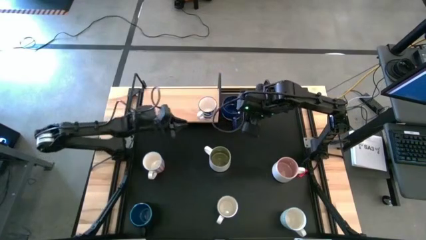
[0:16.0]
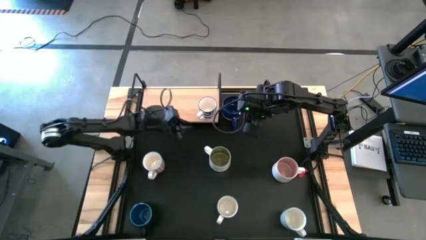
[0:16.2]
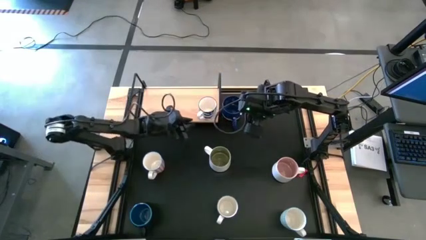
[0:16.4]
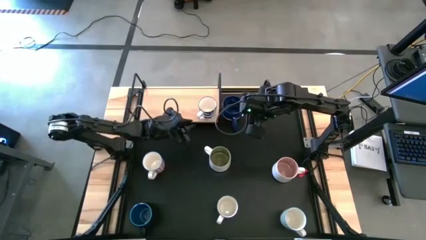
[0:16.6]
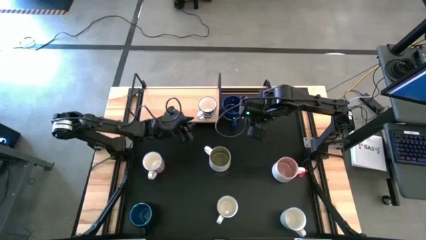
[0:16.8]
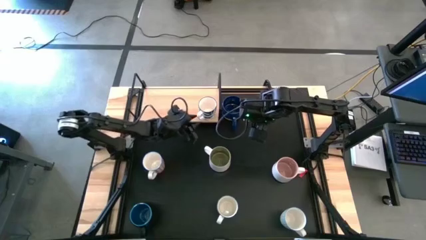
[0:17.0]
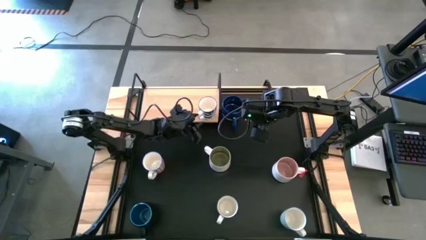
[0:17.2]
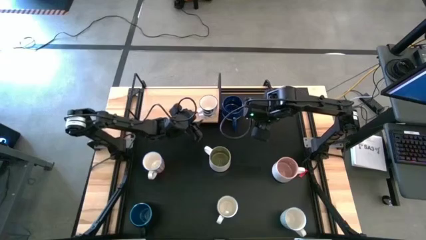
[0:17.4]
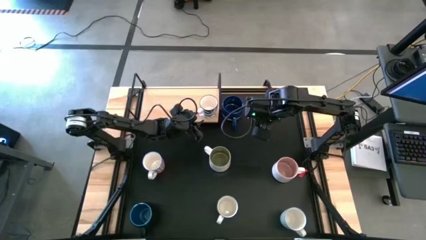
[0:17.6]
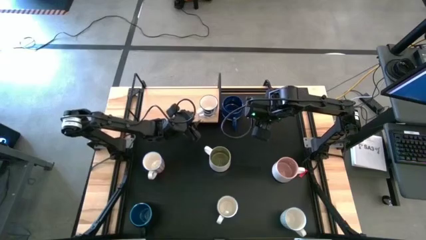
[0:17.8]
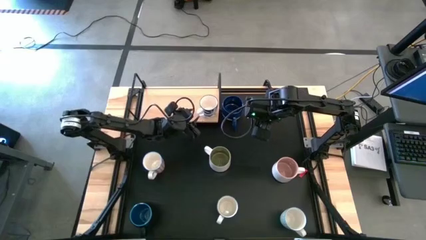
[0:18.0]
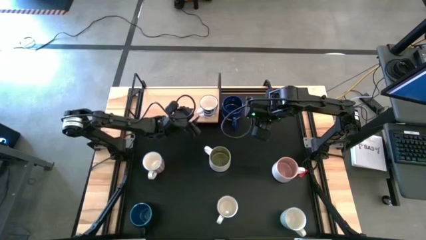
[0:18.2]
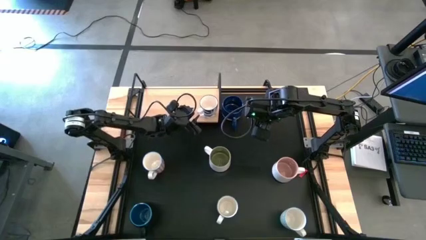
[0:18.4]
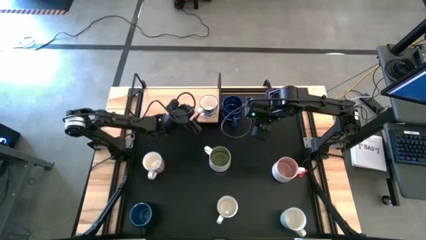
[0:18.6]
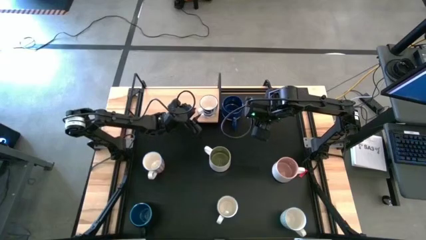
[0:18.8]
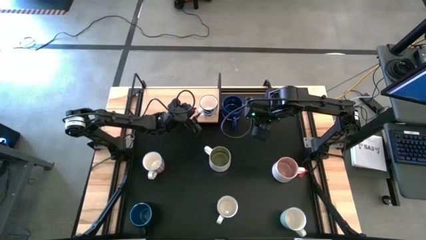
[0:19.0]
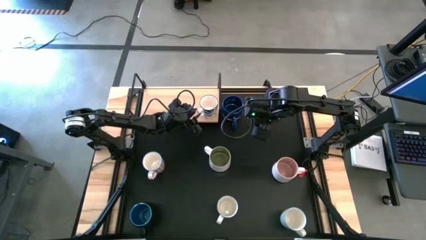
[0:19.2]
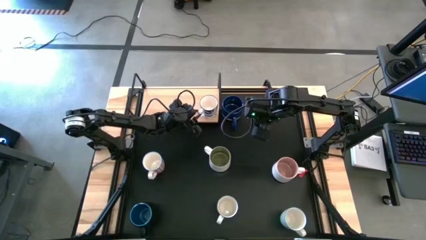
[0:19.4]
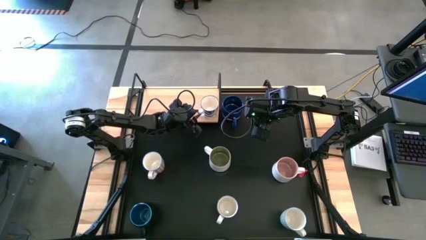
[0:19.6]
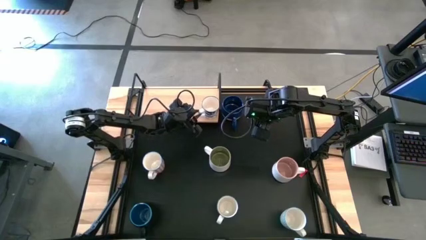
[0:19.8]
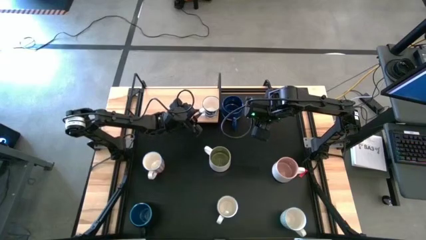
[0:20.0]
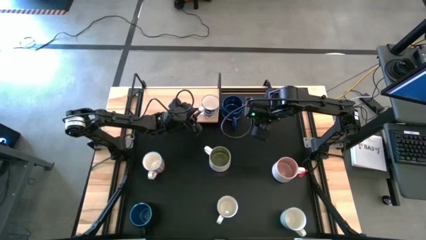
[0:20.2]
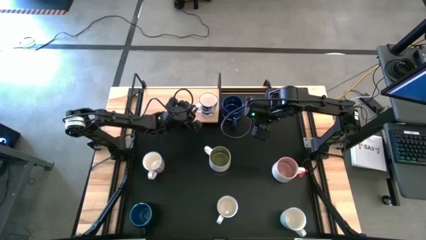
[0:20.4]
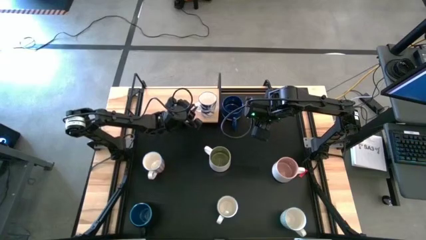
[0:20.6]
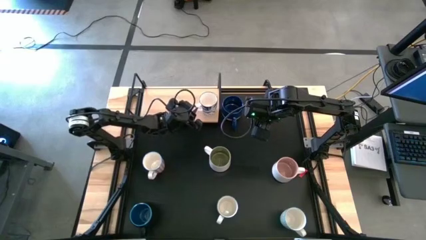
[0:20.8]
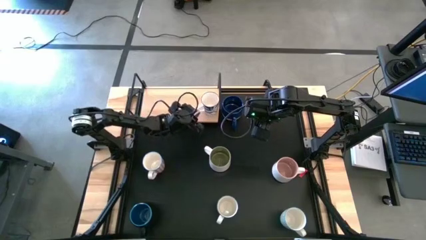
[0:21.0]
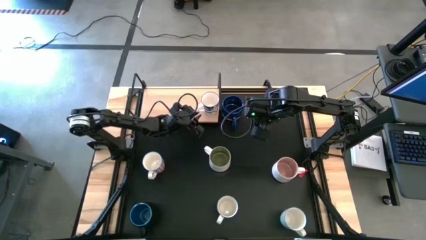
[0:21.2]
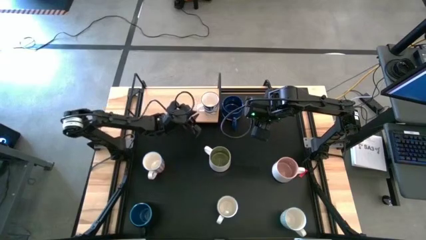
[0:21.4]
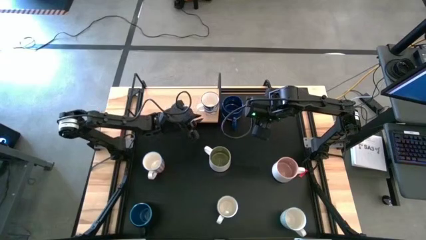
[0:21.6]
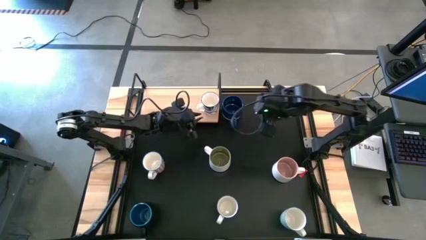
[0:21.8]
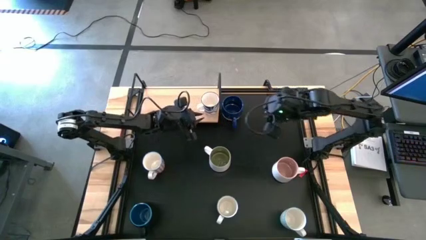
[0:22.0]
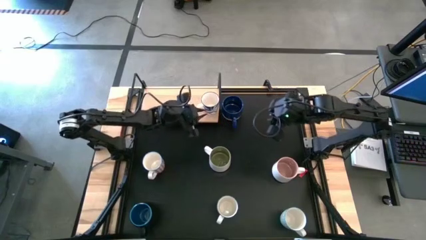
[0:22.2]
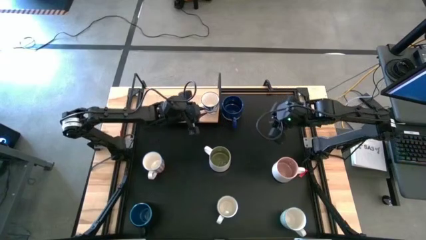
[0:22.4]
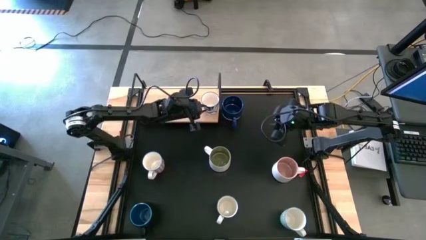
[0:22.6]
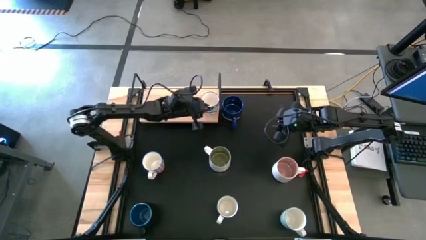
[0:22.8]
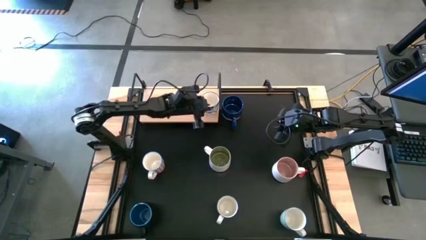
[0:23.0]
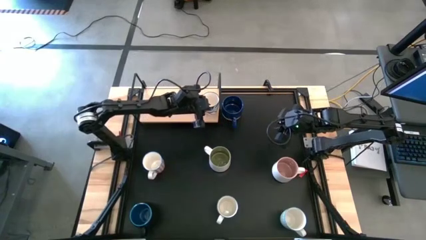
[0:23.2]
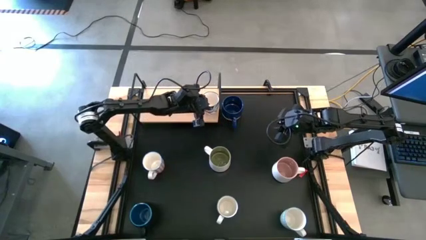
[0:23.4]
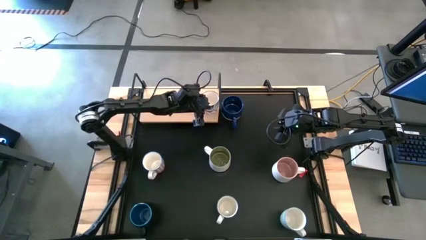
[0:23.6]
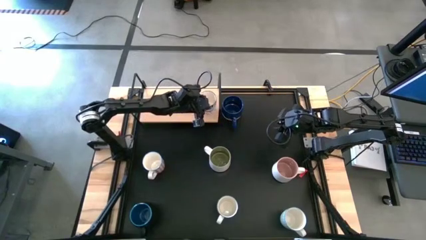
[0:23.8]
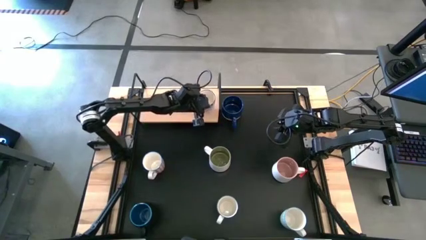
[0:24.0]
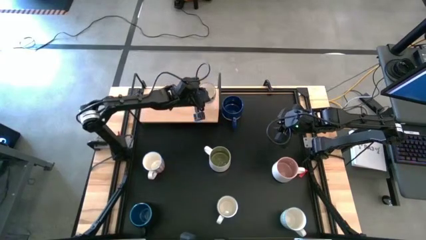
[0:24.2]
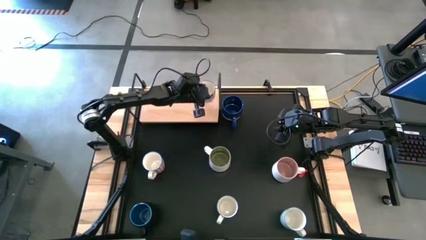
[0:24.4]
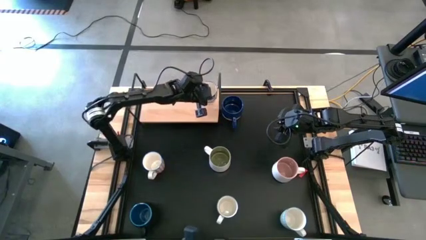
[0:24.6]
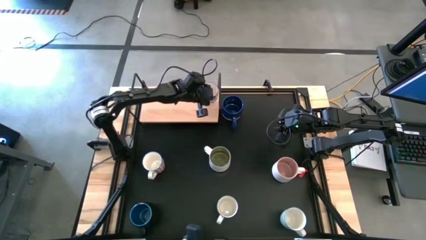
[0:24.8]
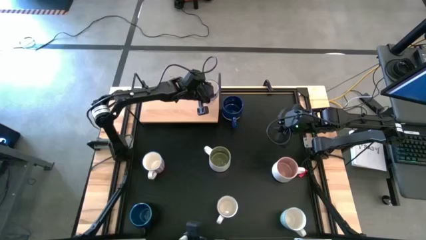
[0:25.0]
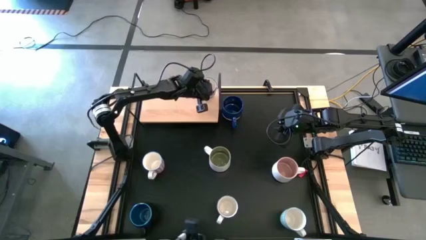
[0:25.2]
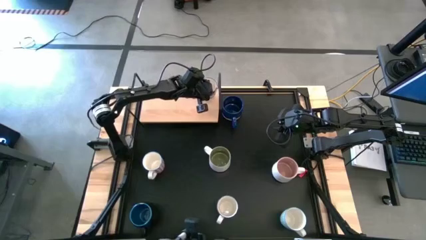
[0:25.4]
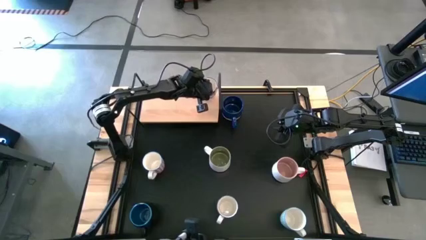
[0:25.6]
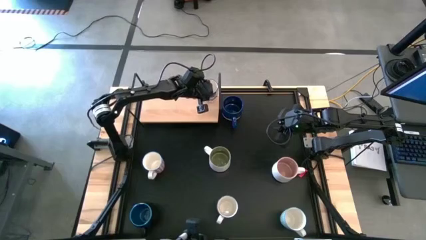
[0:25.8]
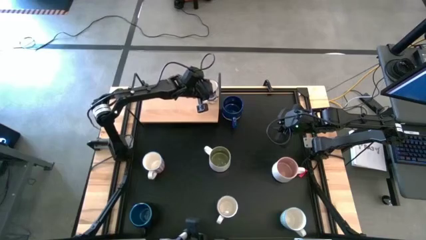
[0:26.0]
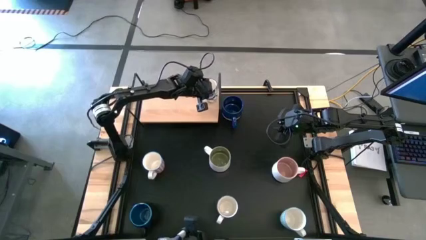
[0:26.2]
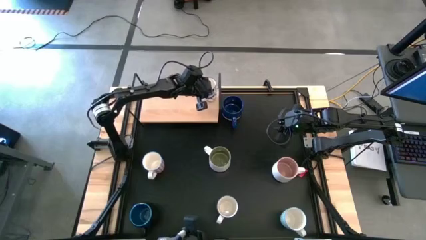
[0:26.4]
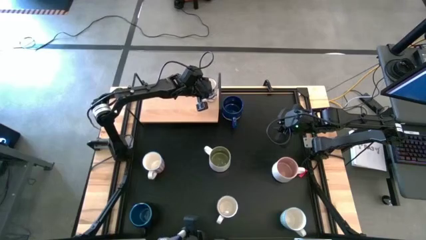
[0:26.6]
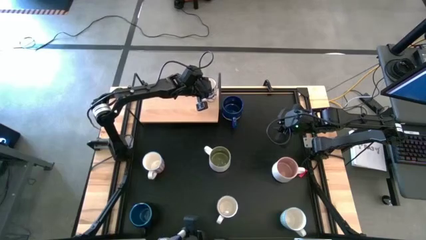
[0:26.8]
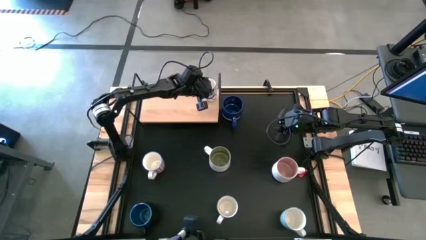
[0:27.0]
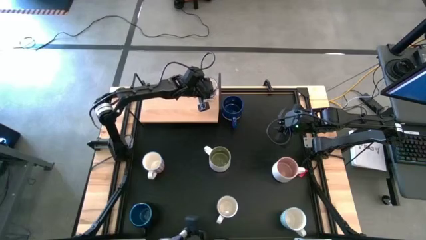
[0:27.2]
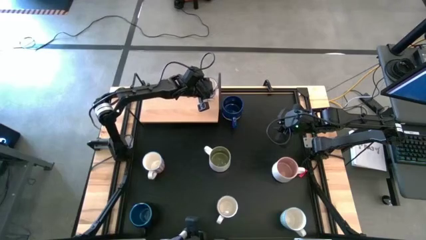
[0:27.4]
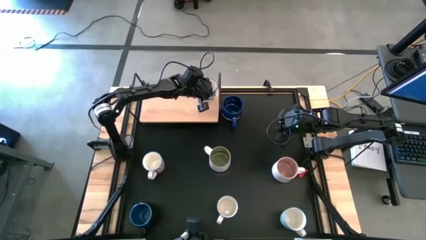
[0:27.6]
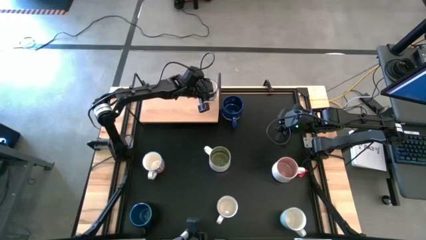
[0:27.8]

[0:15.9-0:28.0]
Task: Place coffee mugs
Put the top blue patterned mug on the shelf

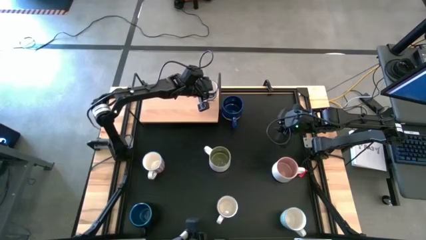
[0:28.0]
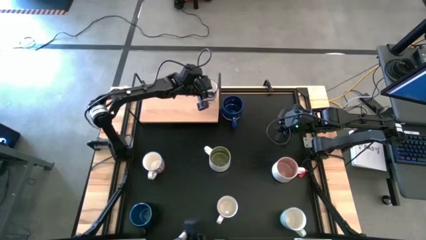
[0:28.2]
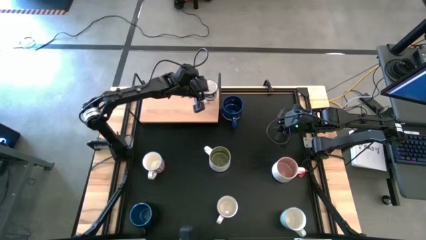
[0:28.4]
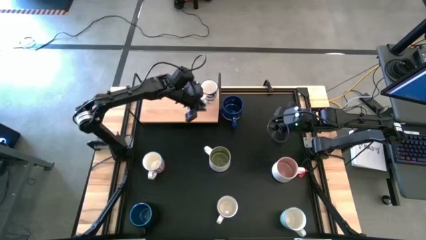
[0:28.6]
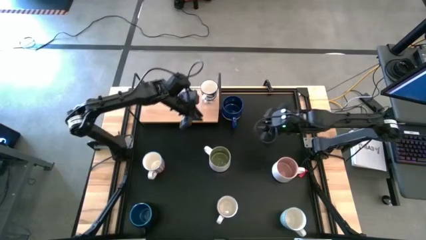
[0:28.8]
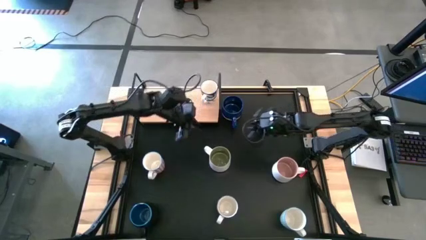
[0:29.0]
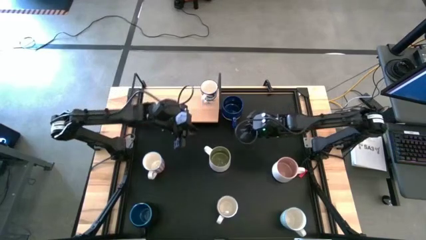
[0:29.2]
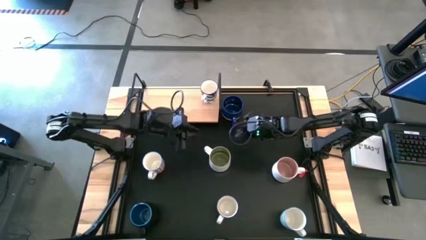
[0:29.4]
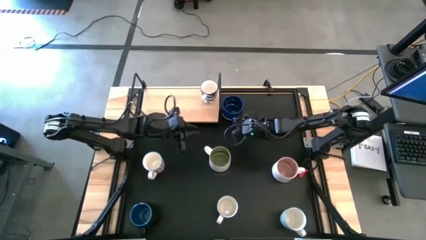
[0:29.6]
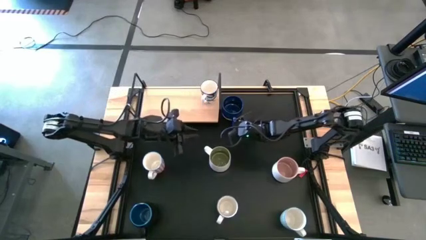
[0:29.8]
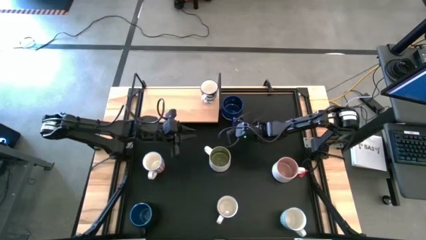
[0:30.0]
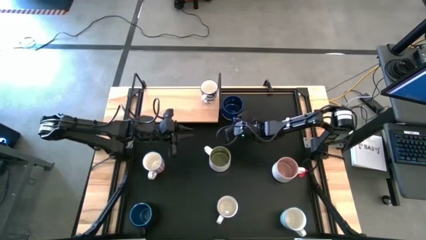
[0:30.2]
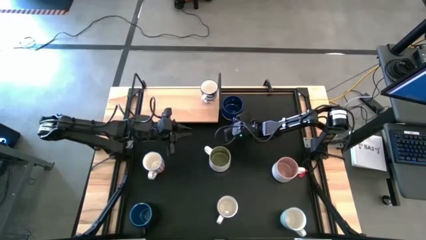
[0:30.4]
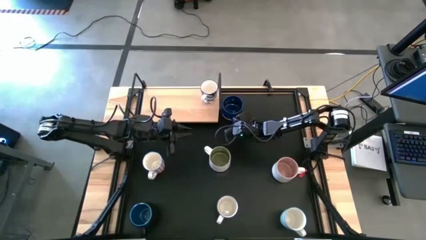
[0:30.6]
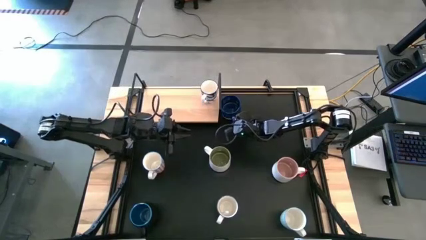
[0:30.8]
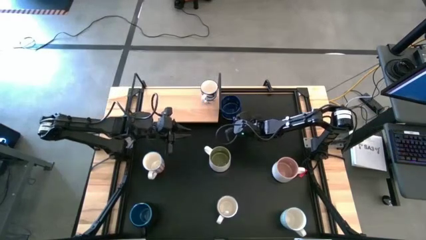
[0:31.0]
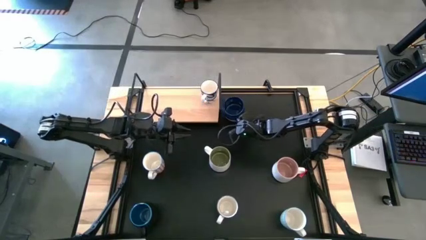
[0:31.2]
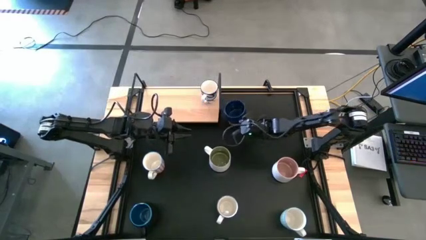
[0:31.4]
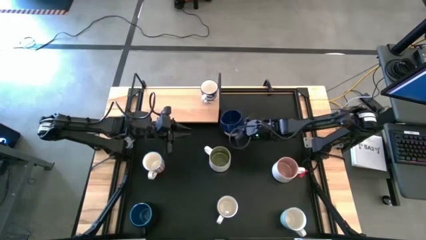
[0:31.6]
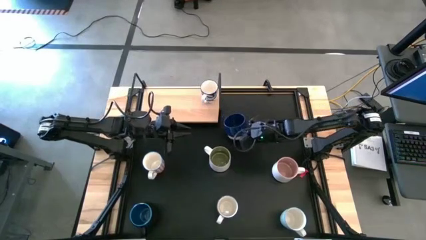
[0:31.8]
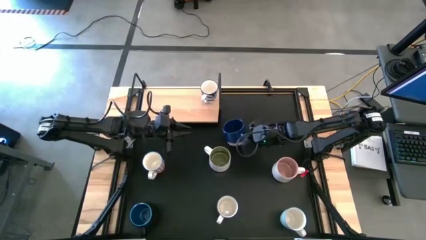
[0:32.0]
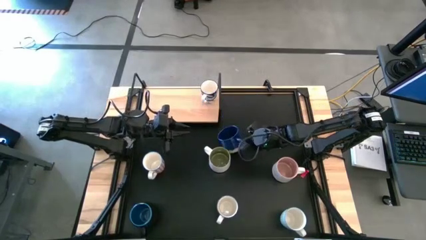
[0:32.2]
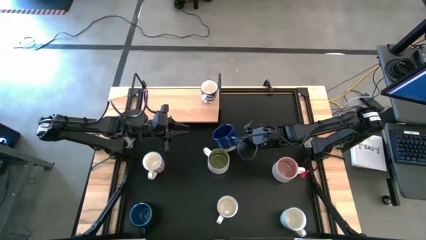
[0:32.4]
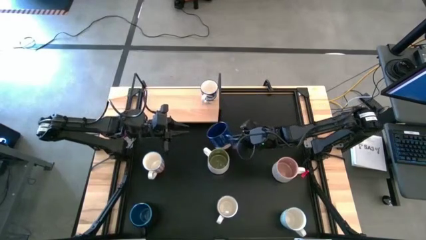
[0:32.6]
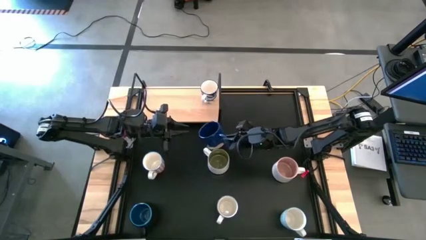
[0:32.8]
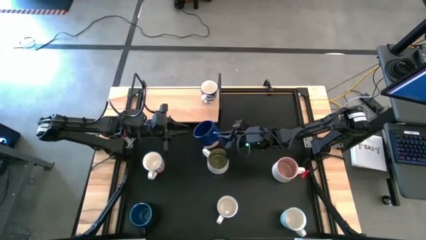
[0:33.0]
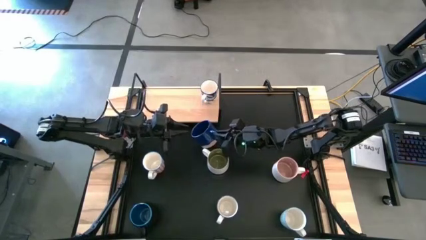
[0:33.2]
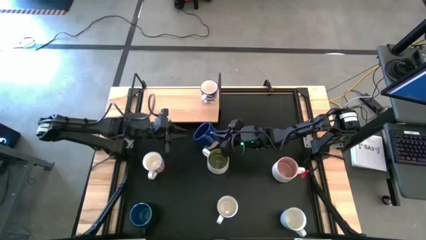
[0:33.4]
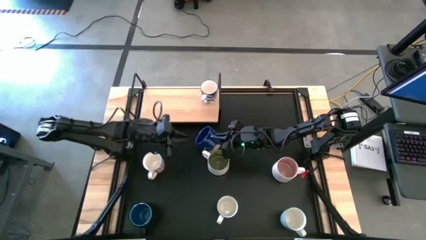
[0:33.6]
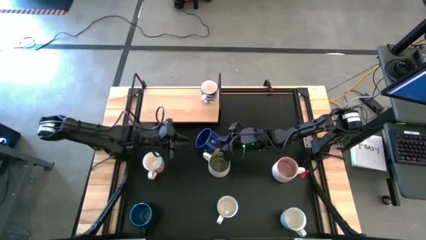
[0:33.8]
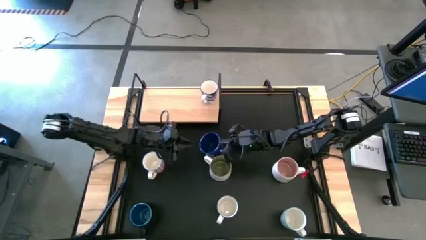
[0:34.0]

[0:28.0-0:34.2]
Put the blue mug on the shelf
